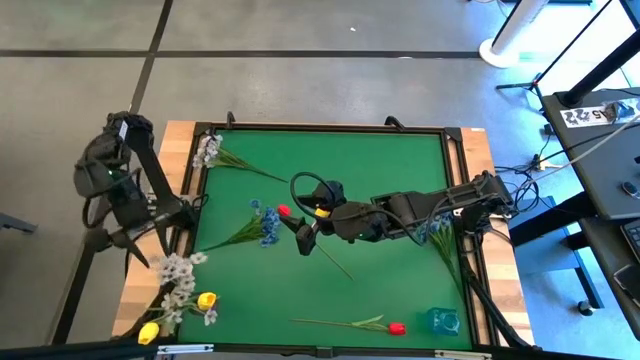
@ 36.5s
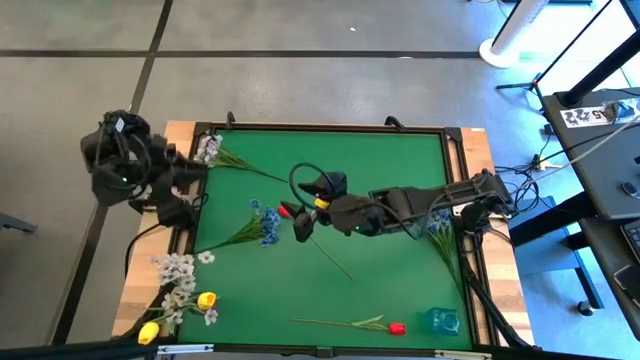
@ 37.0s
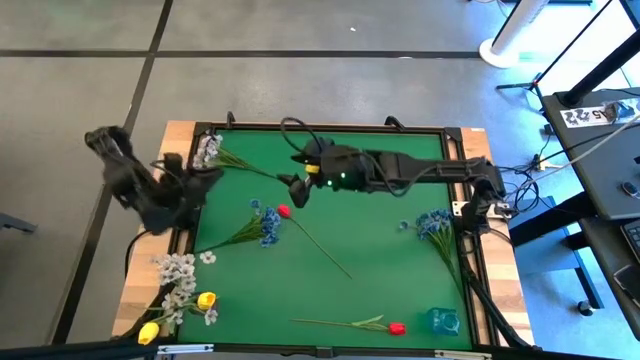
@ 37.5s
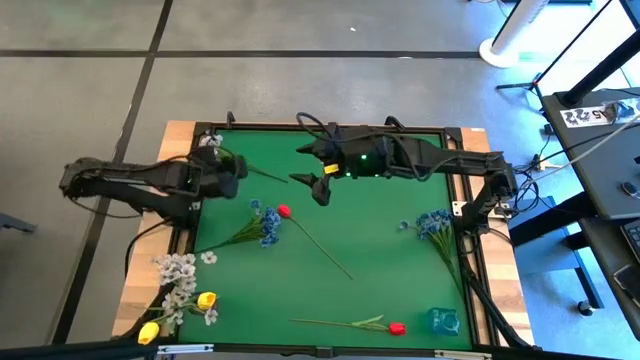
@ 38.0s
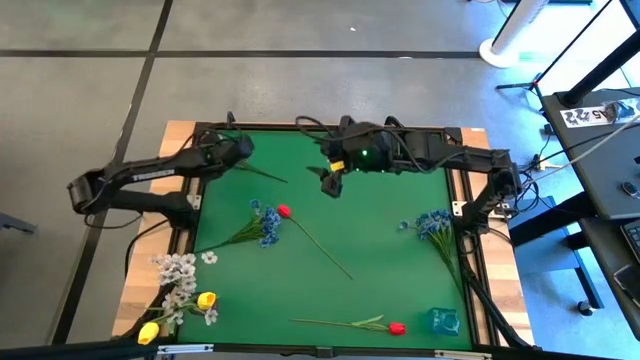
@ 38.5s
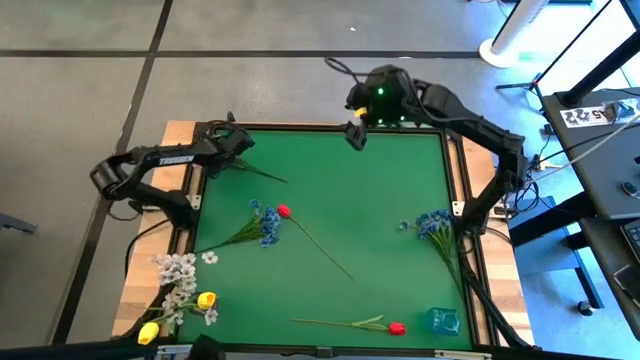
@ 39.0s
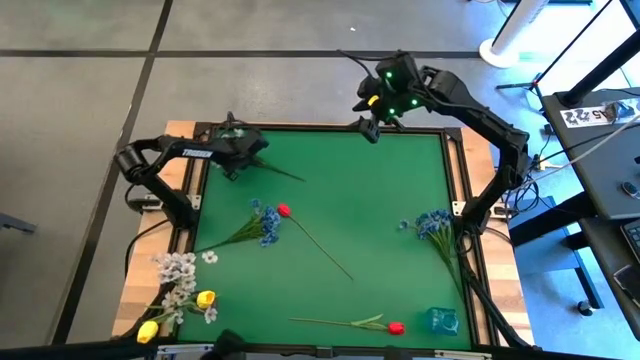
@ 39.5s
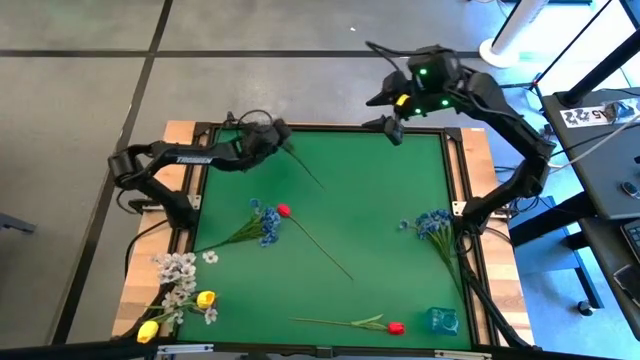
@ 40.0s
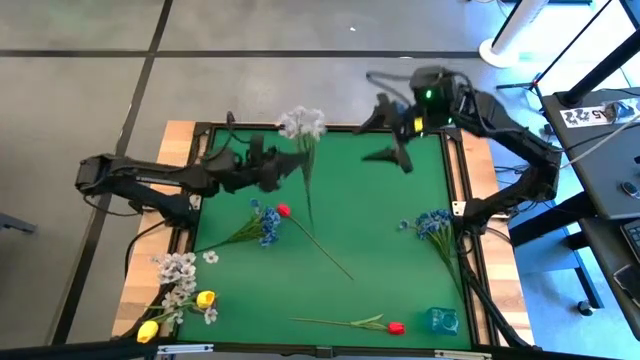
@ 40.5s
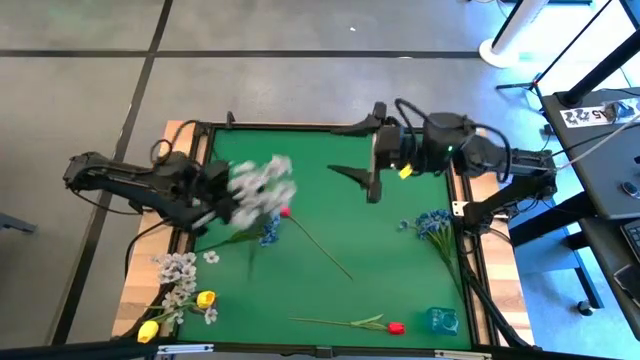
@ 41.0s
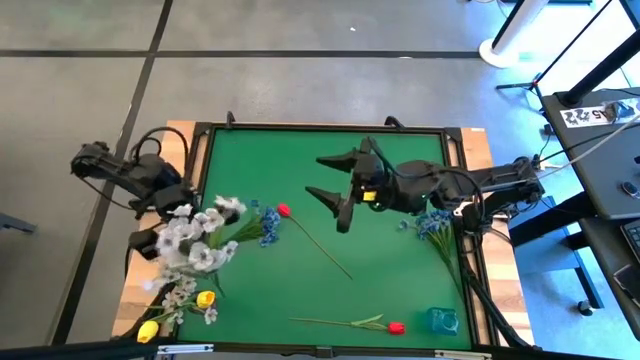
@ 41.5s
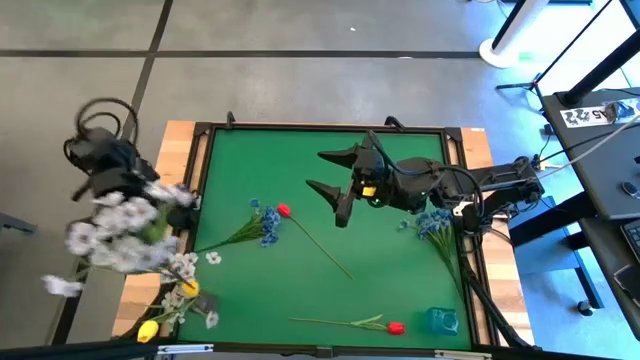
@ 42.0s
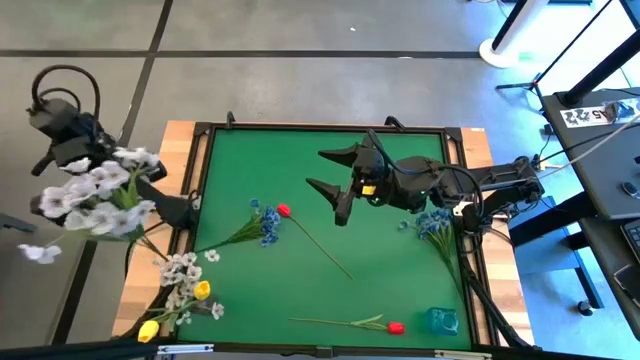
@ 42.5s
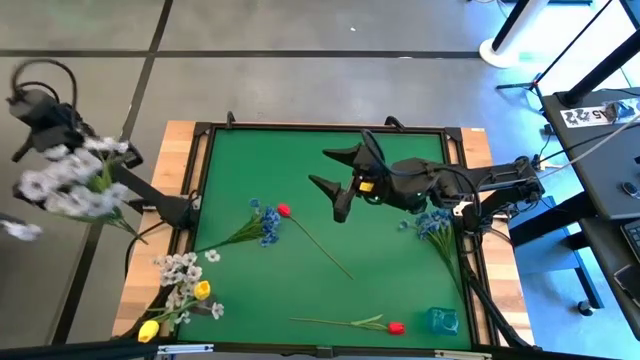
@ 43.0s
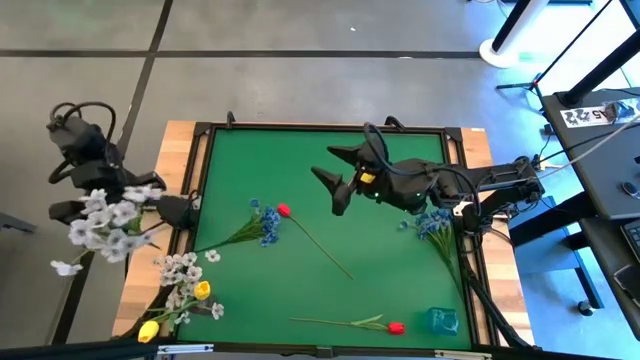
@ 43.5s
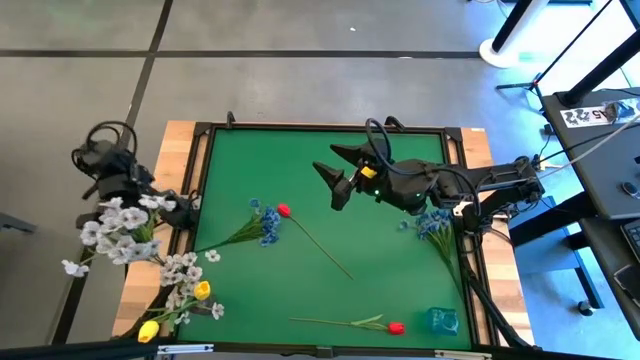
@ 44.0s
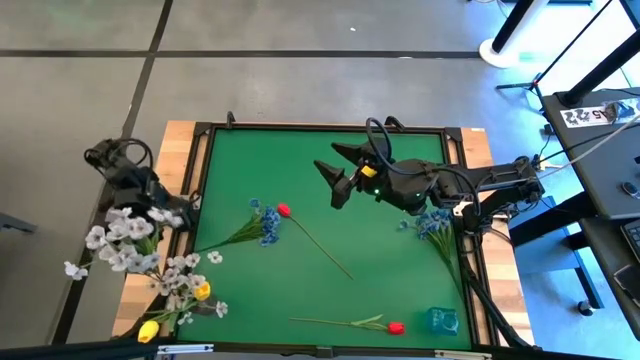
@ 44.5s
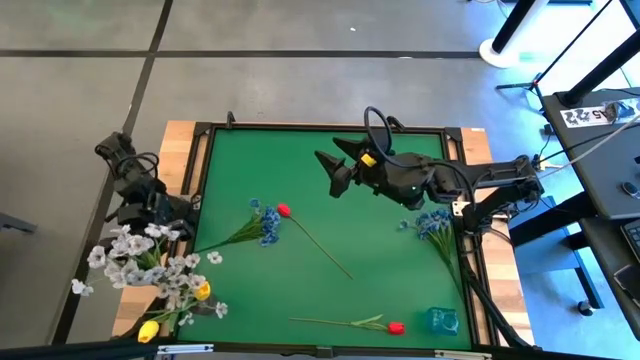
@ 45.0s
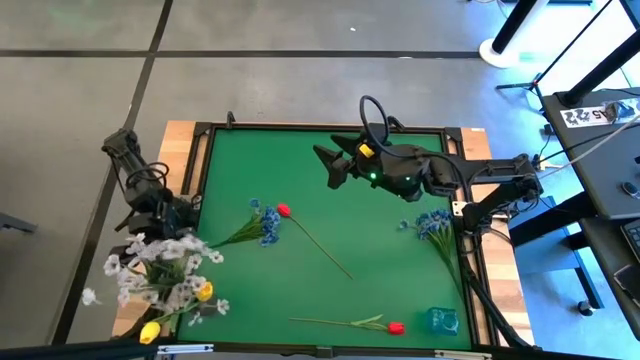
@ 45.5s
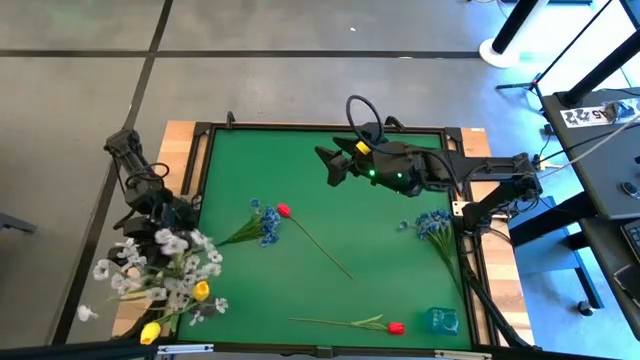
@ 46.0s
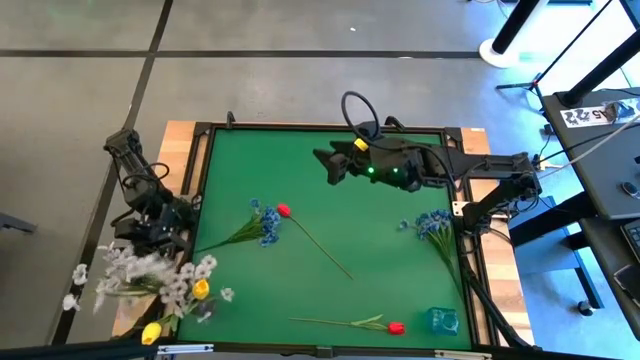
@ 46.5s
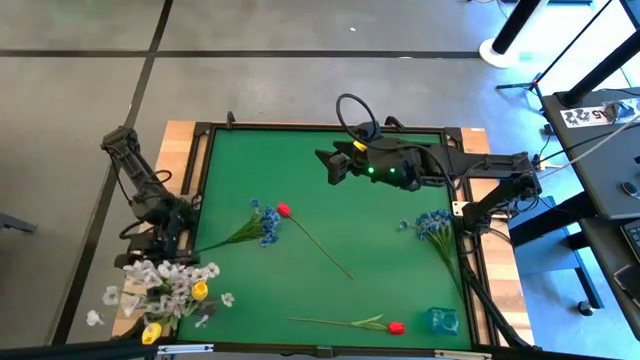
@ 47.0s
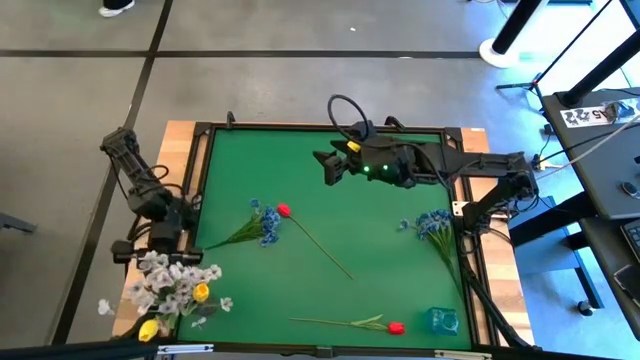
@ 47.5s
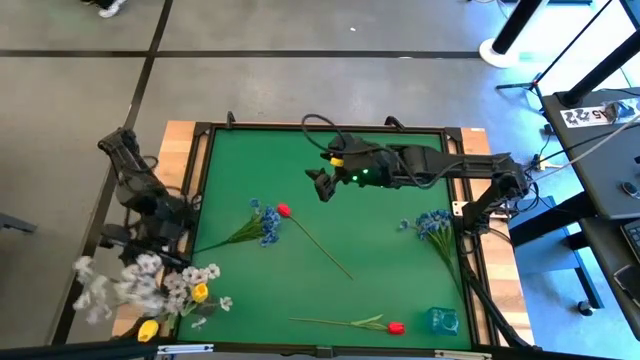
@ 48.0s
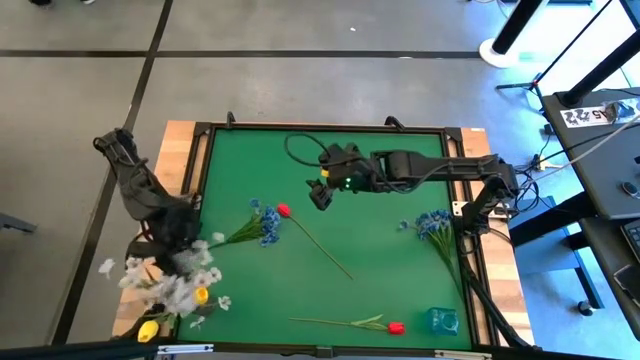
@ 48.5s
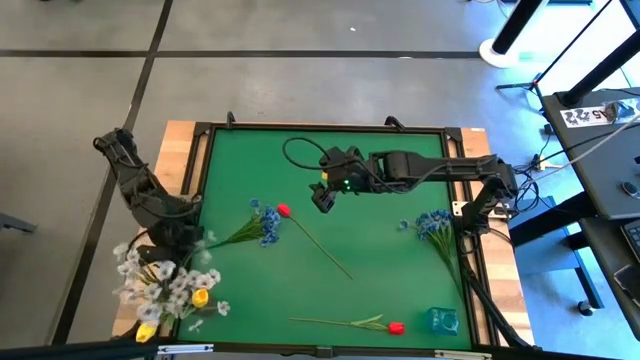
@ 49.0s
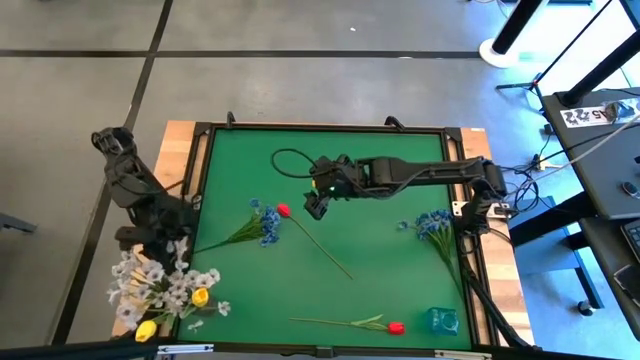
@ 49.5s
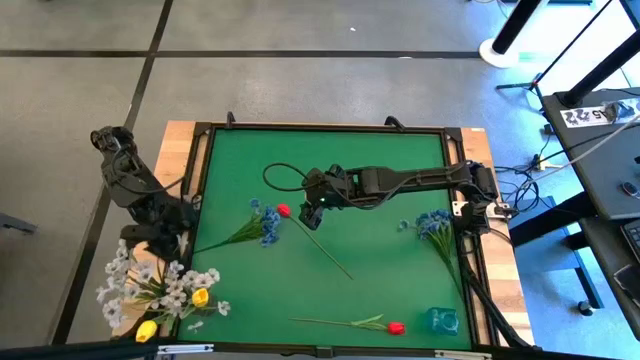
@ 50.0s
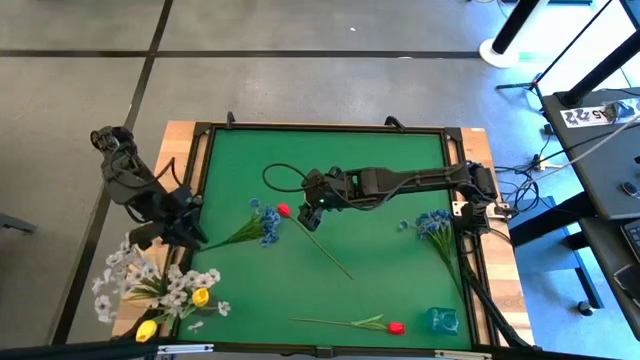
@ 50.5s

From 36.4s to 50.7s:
Task: Sort flowers into vase by color
Put the white flowers into the purple vase

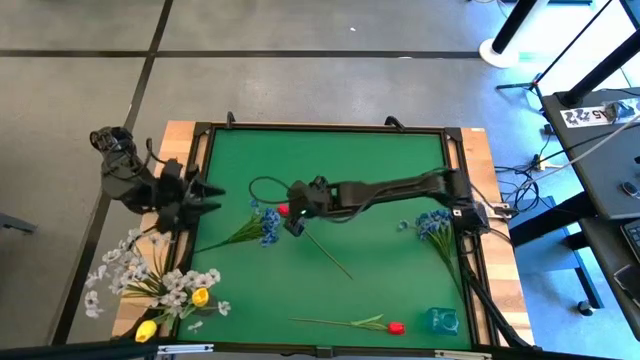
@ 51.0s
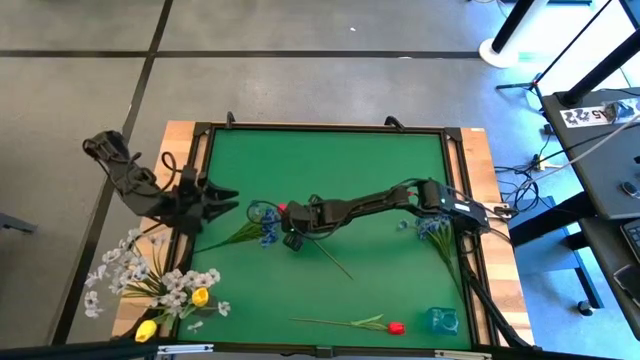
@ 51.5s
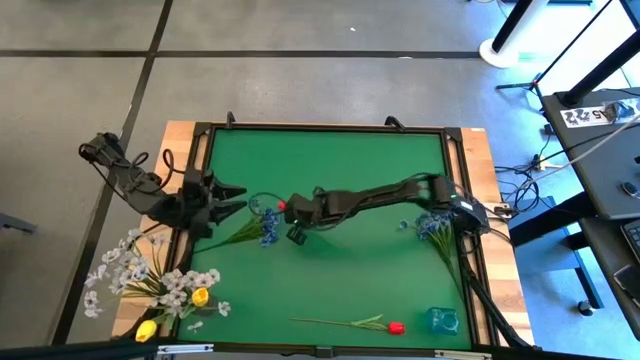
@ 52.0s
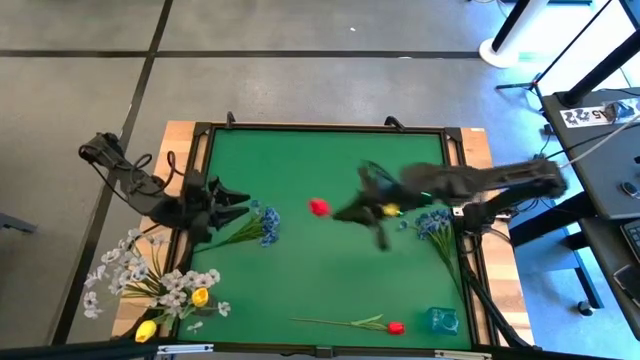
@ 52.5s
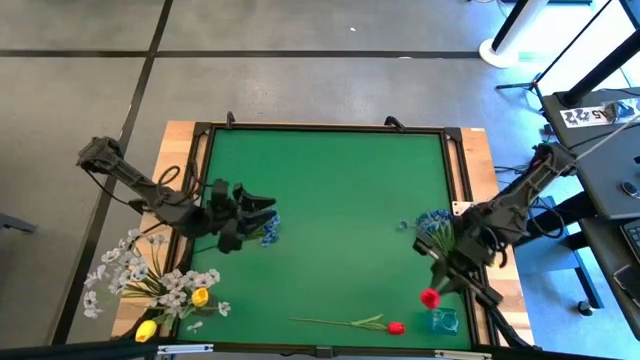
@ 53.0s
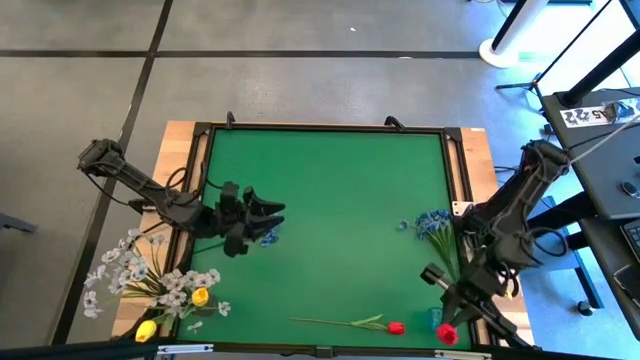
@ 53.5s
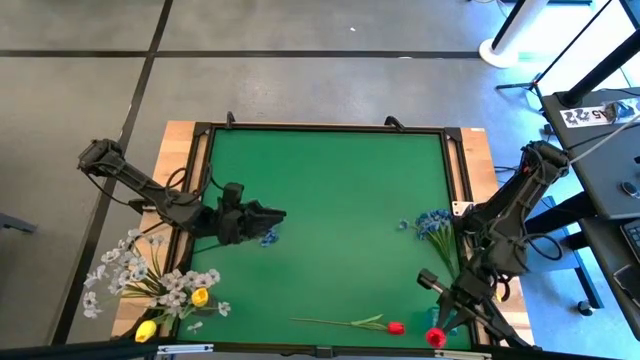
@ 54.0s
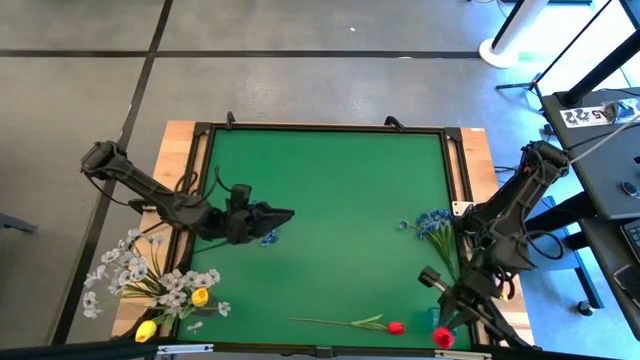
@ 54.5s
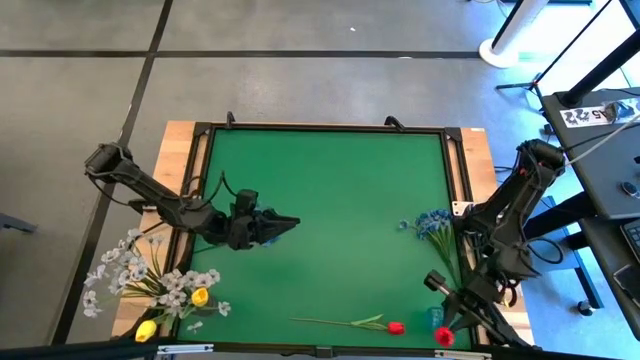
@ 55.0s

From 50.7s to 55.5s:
Put the top red tulip into the blue vase

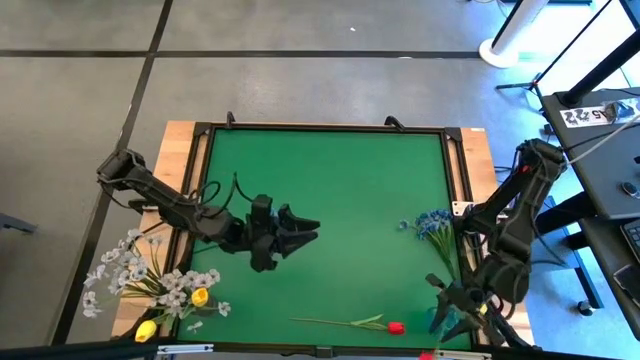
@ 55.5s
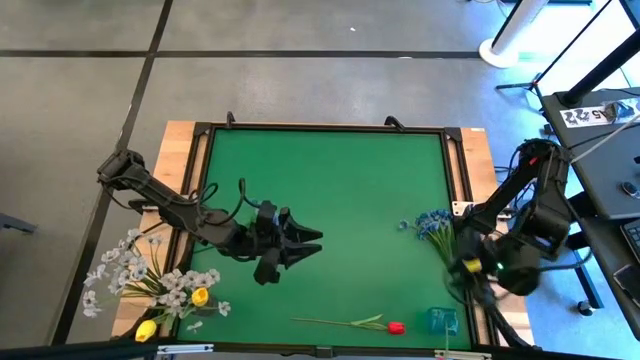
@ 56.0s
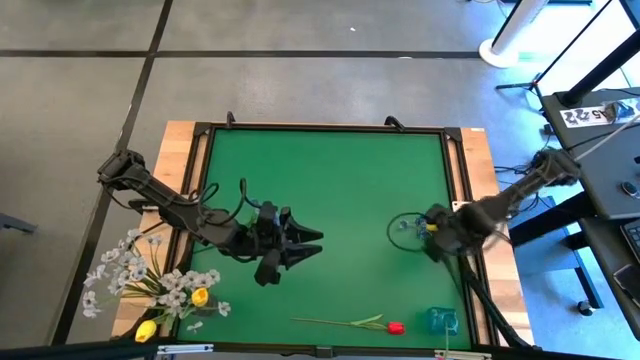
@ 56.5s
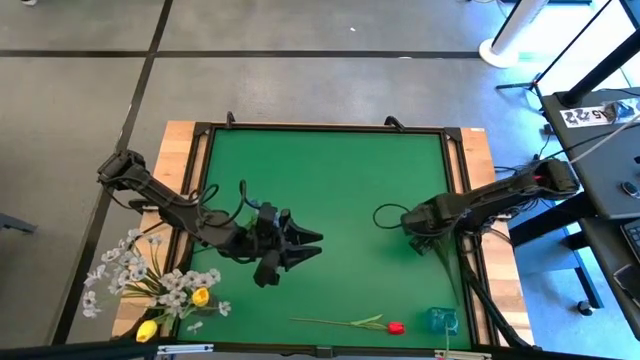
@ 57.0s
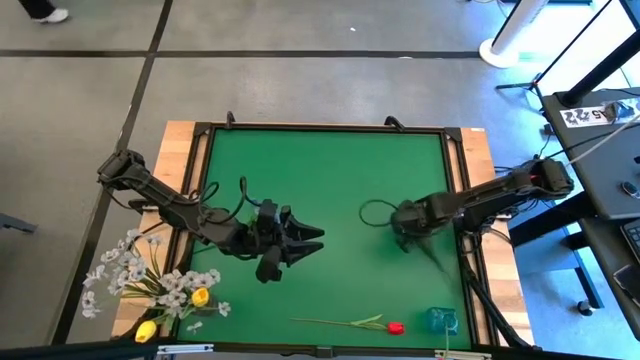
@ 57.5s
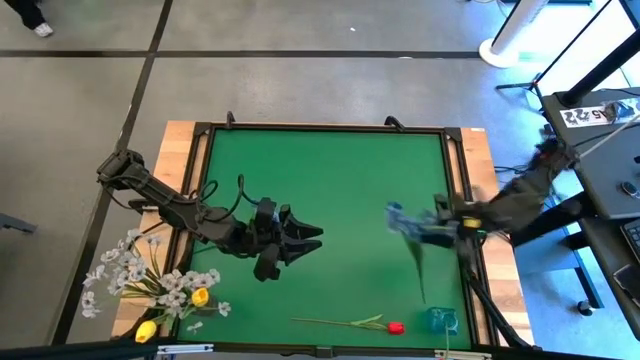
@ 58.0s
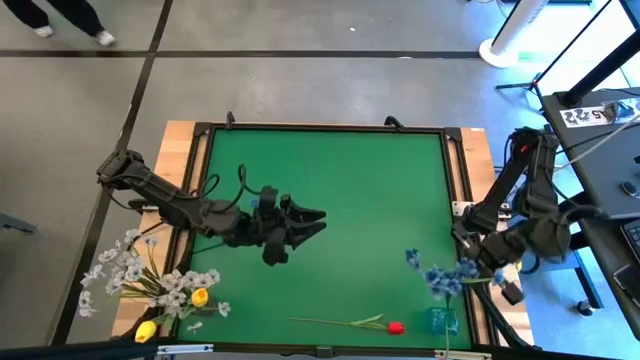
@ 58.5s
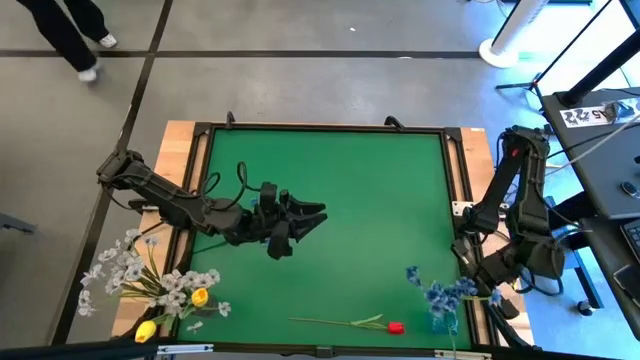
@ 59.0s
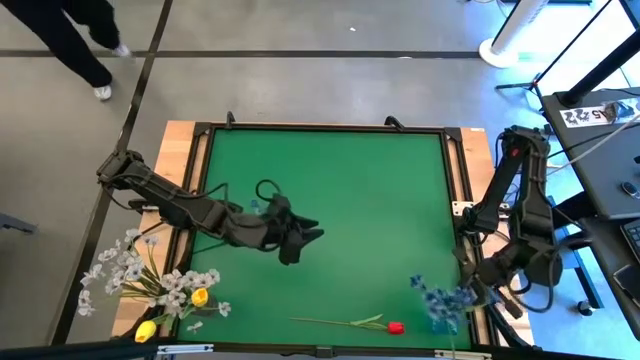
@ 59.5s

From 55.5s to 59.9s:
Put the right blue flowers into the blue vase
